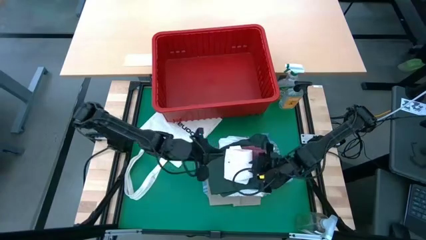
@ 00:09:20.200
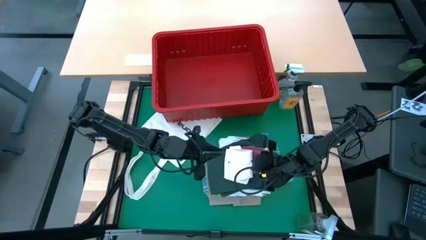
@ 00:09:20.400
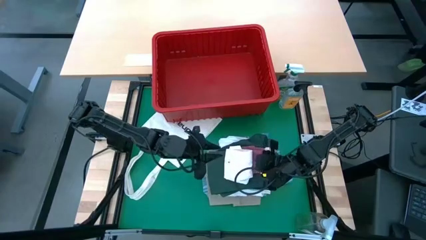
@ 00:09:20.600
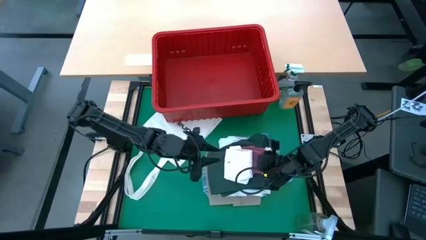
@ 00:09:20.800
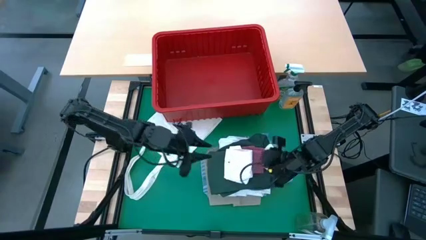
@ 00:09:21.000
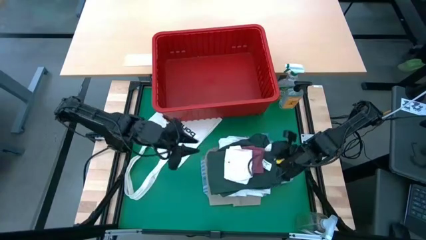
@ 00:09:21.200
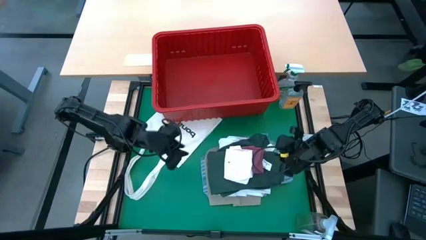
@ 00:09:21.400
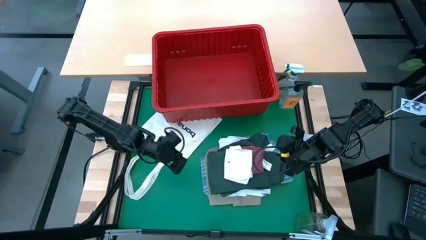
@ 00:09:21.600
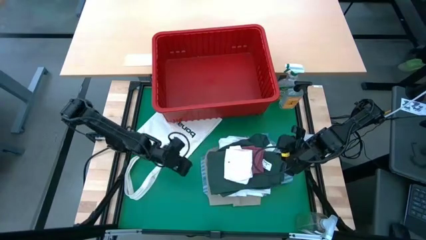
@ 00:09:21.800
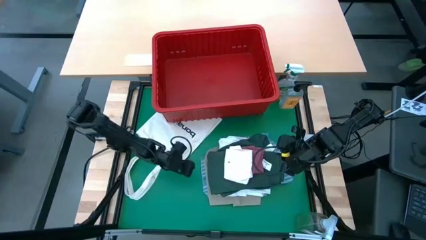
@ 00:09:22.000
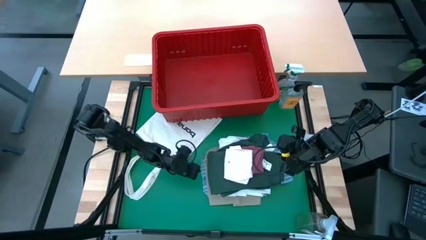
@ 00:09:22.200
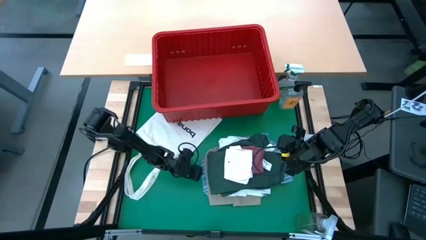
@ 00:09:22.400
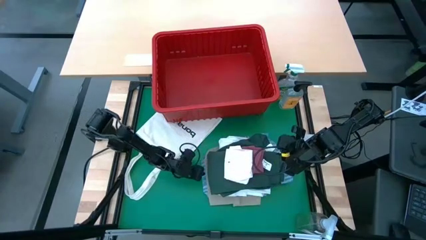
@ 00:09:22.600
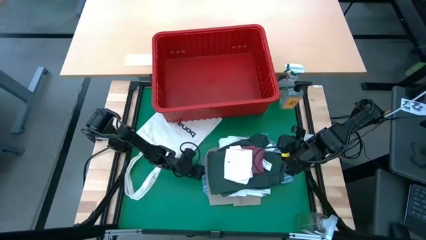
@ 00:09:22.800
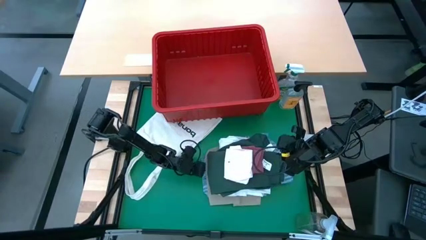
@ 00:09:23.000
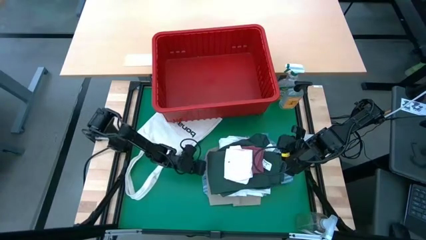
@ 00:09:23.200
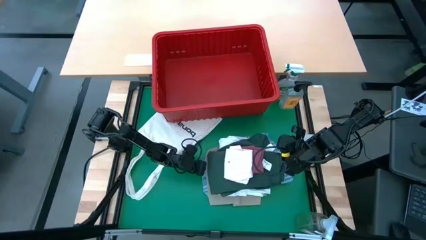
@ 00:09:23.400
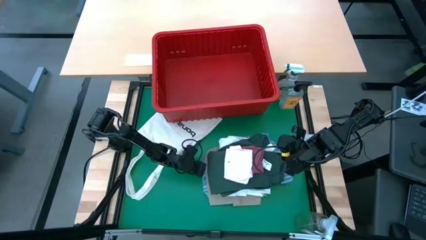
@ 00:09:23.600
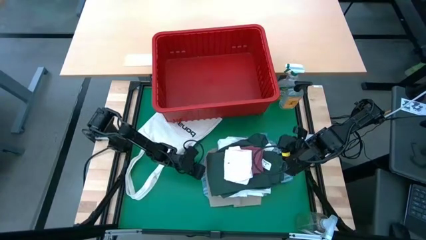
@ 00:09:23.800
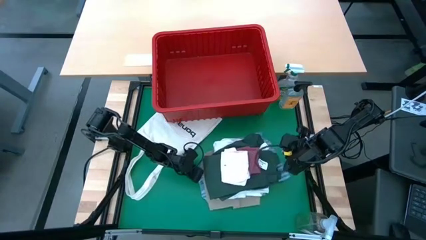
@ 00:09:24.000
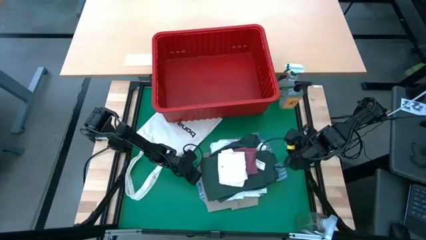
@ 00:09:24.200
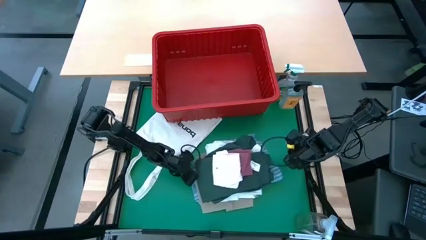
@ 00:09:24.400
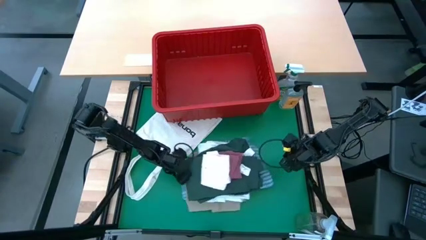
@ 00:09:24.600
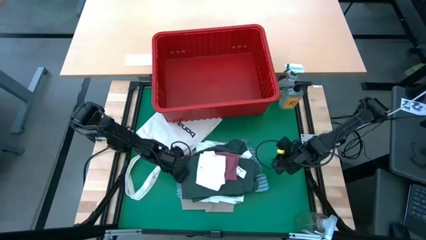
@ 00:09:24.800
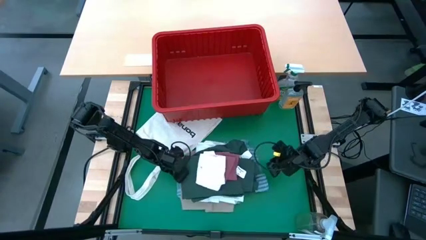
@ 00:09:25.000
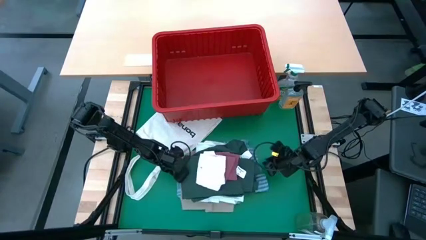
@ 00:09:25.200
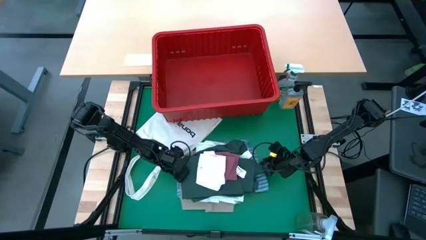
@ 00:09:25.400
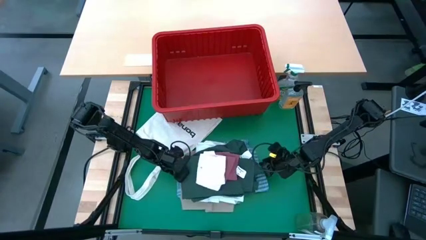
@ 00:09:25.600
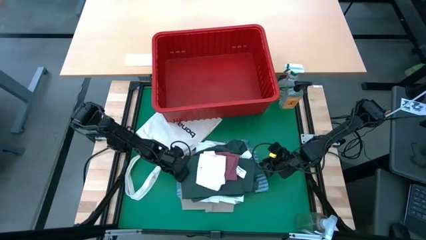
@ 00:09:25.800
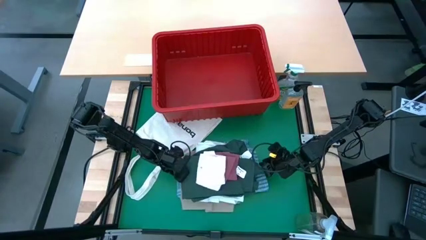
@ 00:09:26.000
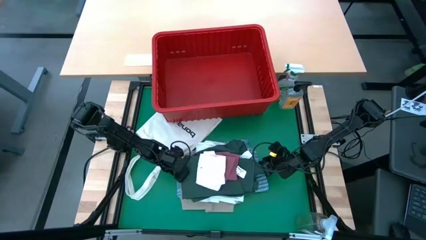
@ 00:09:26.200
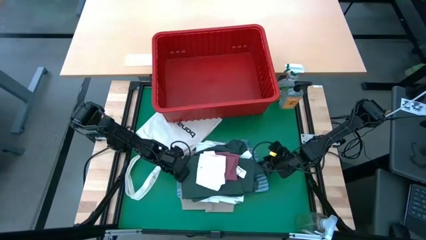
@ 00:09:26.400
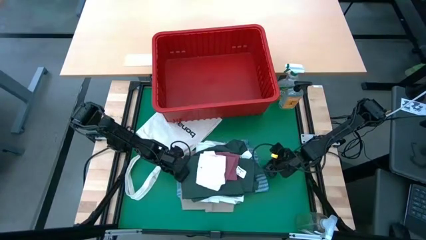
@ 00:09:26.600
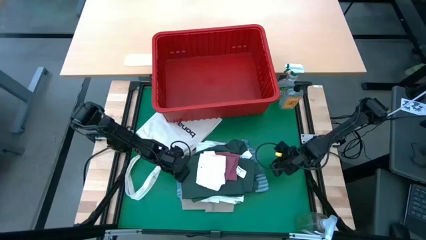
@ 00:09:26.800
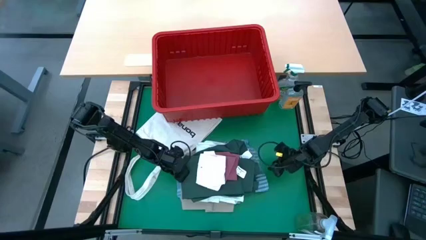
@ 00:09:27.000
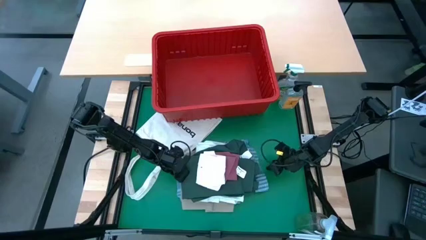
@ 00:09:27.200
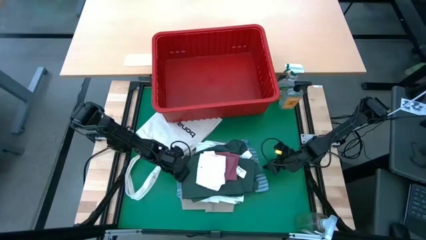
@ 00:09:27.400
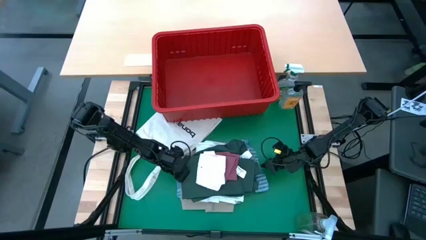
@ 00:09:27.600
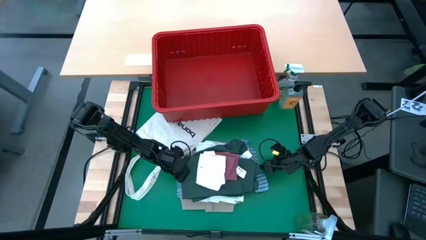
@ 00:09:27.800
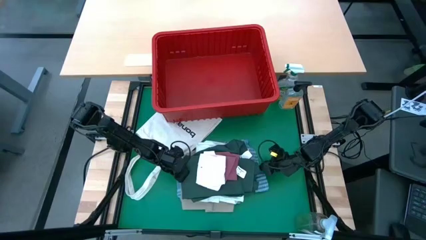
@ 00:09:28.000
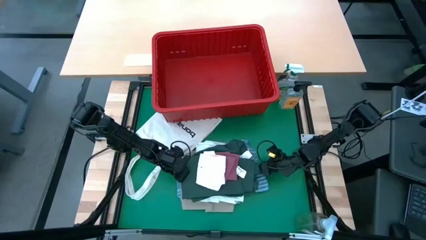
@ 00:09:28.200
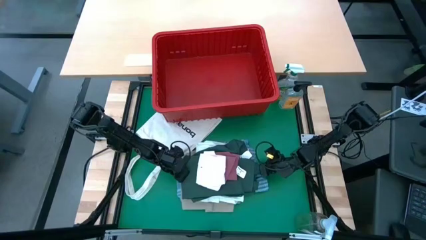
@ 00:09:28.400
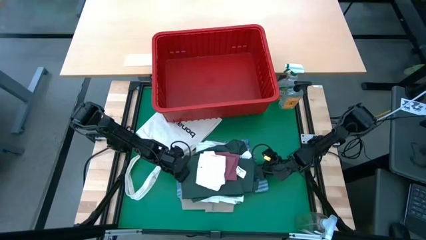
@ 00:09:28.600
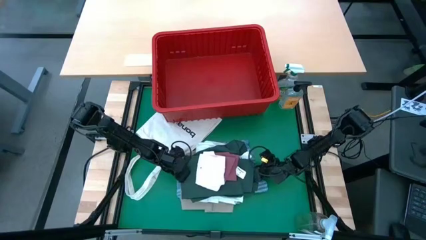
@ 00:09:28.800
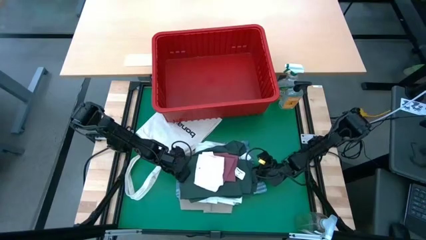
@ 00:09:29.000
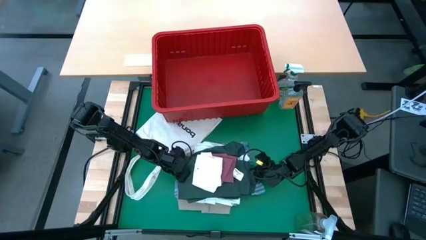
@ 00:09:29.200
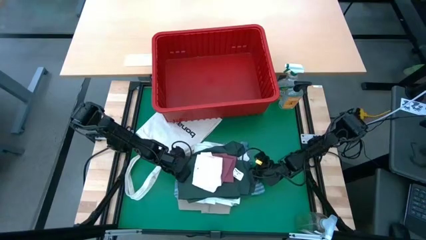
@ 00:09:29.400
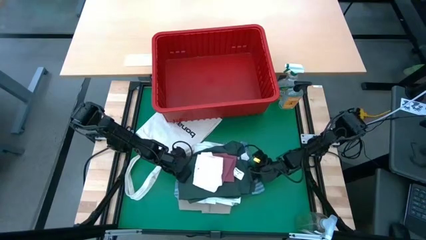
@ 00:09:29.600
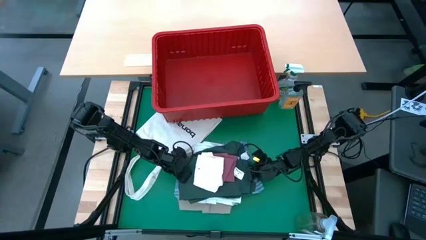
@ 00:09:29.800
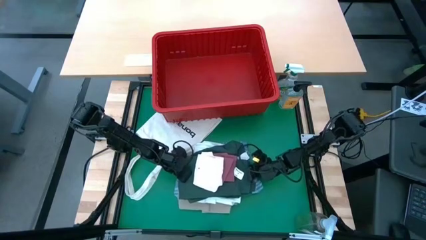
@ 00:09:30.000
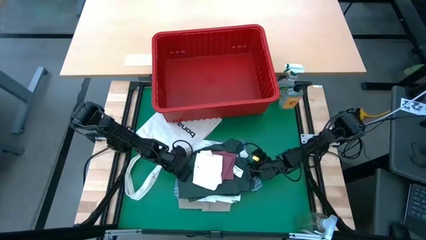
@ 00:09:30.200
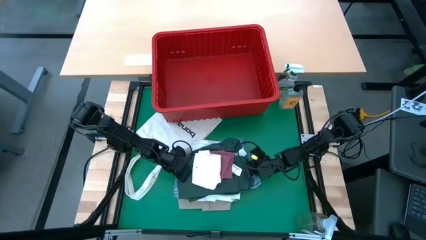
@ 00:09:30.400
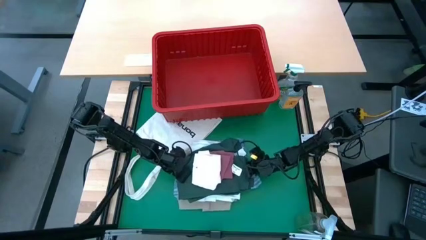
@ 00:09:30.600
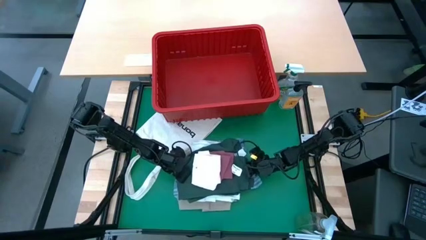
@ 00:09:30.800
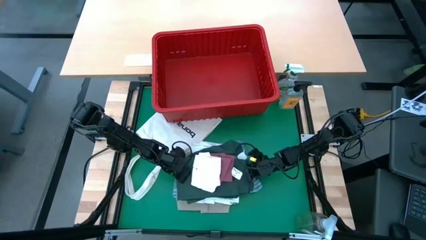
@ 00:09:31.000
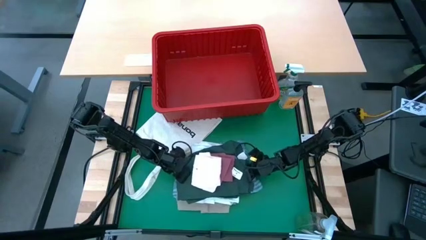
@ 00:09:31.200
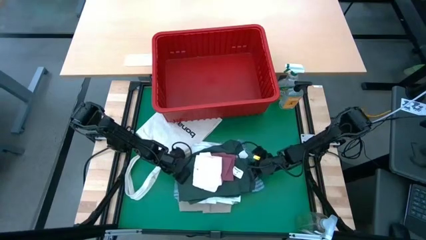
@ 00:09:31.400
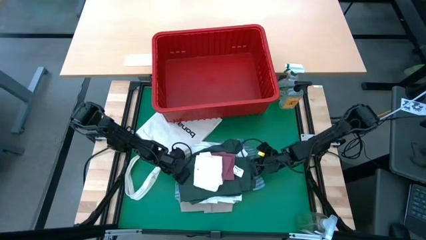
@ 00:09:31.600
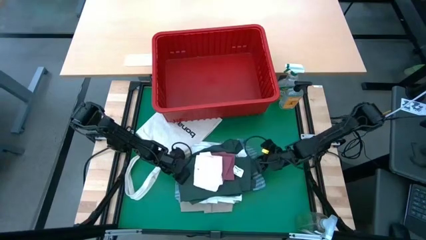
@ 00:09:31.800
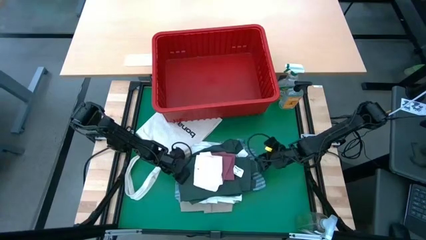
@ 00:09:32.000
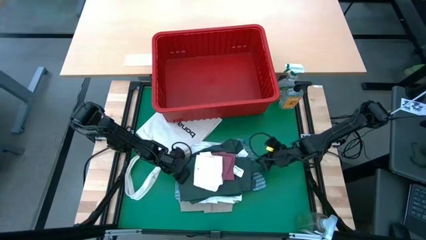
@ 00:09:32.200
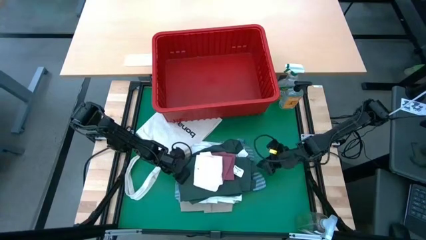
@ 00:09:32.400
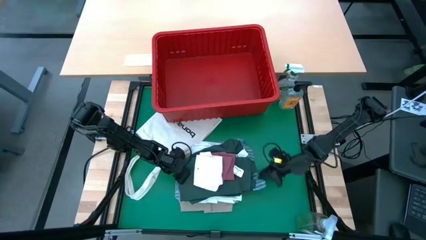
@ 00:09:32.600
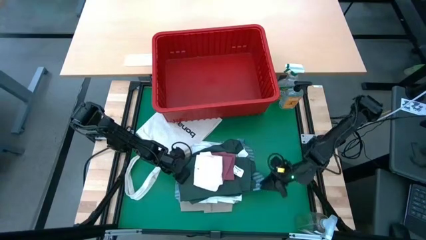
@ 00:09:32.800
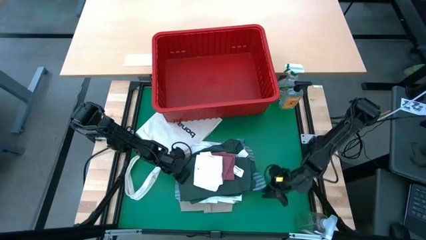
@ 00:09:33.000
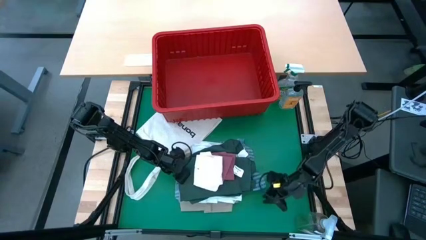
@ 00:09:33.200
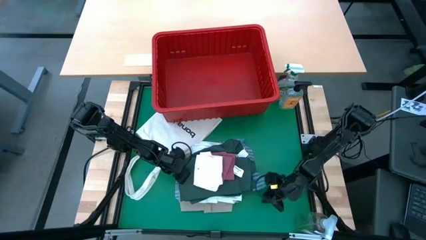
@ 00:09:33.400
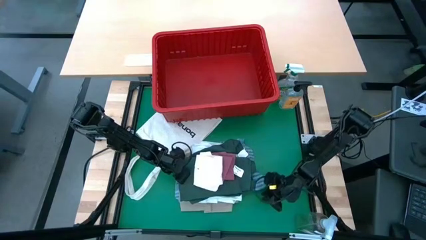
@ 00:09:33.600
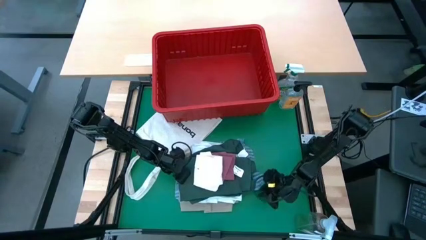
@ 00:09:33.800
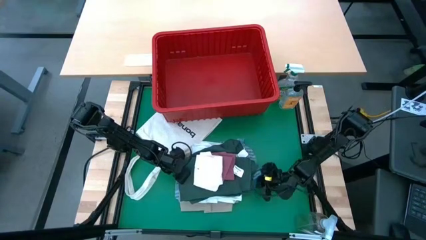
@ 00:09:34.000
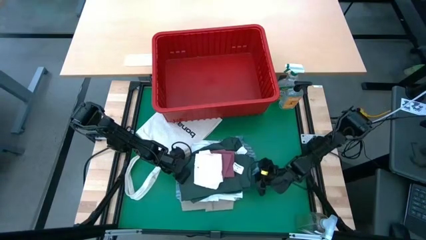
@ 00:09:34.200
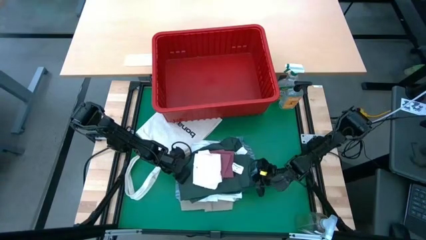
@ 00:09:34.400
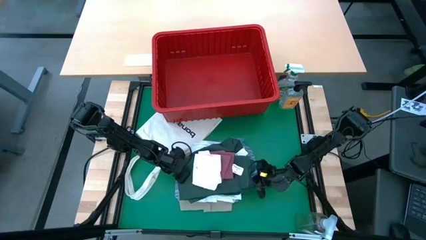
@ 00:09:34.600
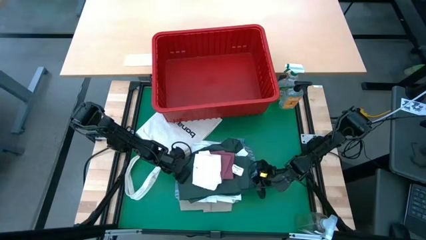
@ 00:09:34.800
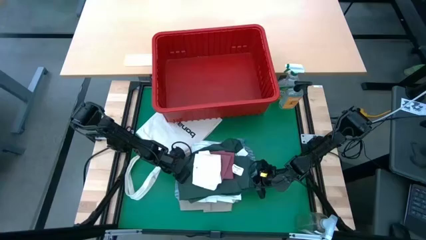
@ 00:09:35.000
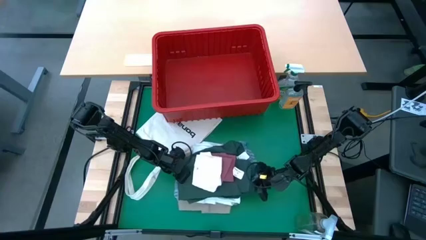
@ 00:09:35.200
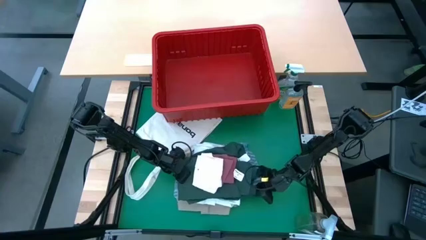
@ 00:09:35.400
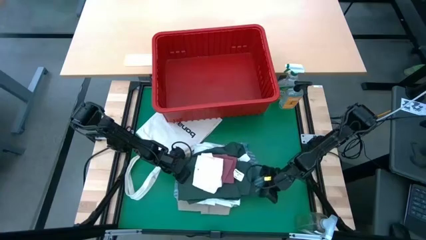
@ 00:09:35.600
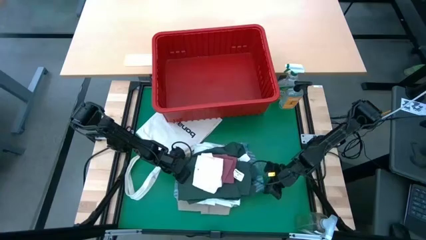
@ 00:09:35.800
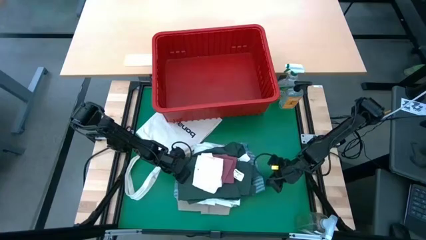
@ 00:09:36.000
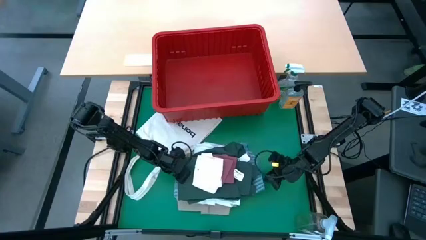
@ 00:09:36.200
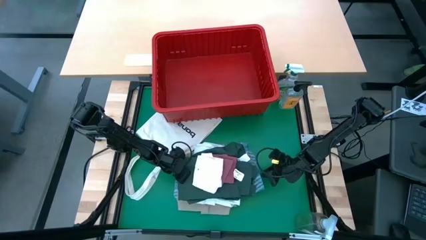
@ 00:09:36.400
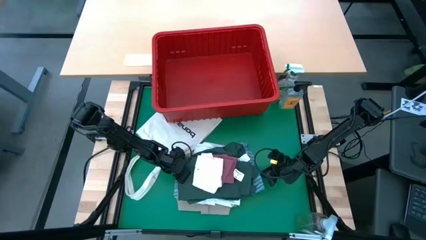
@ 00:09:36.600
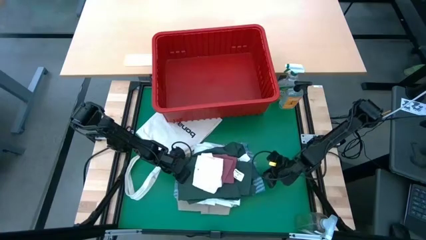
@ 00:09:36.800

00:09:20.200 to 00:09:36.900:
Task: Fold Laundry from Bin
Put the folded clothes into the red bin
